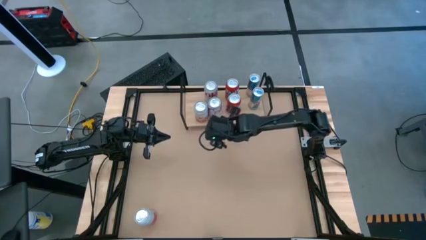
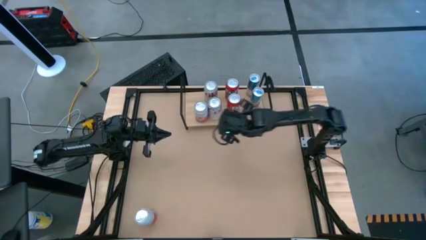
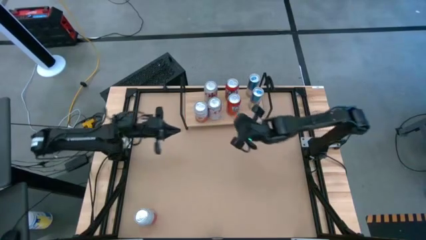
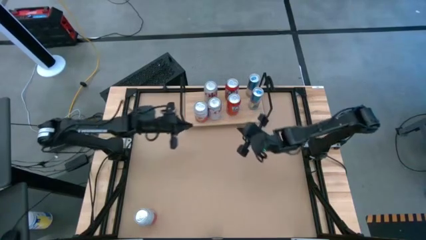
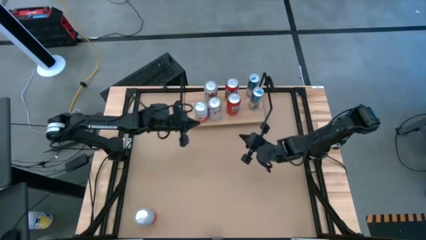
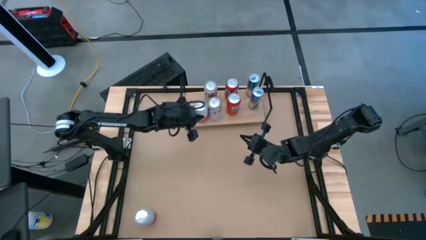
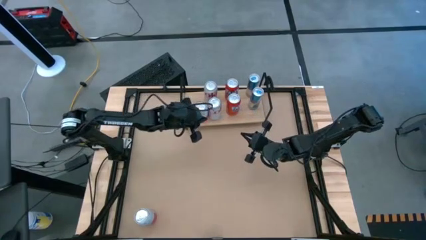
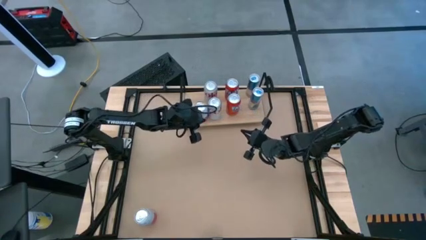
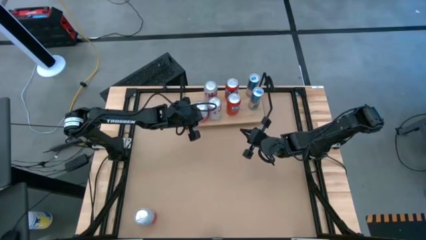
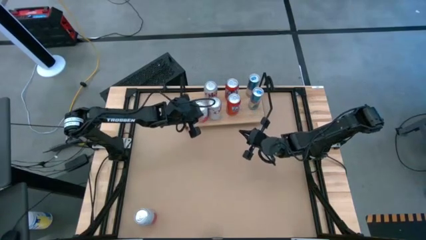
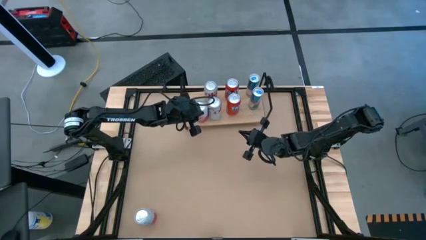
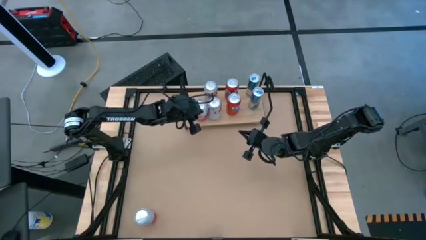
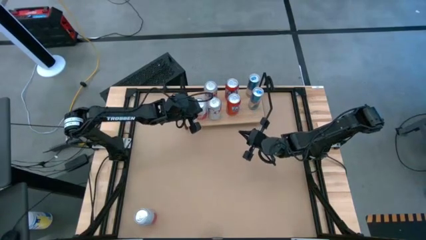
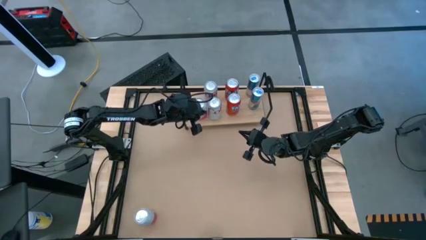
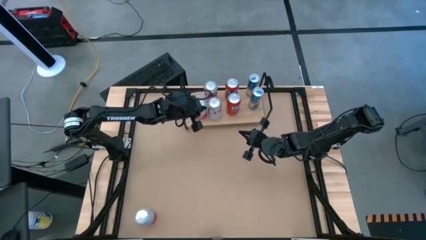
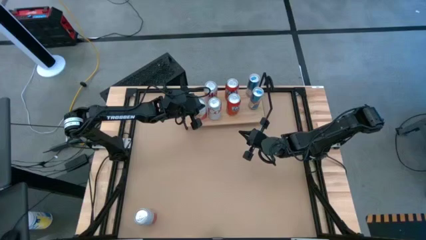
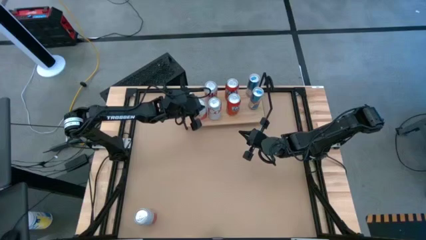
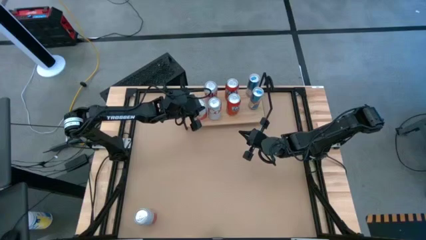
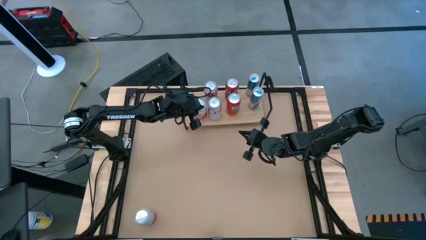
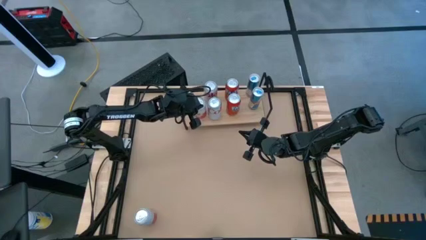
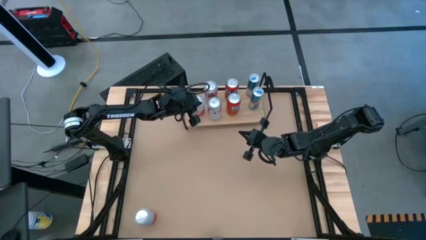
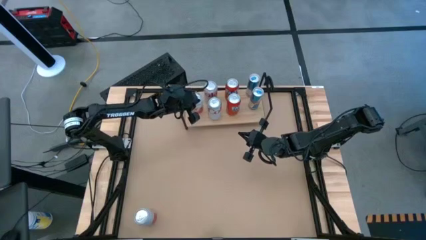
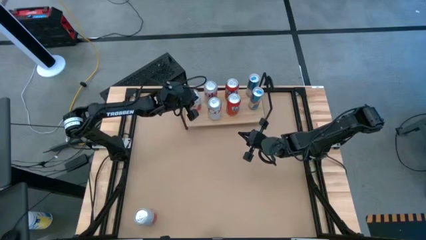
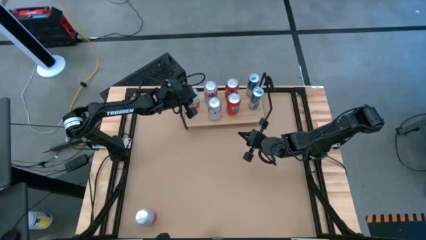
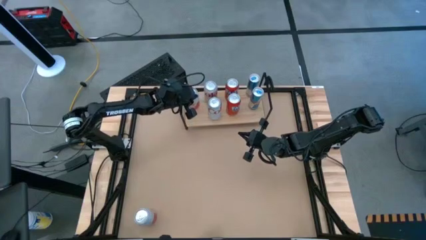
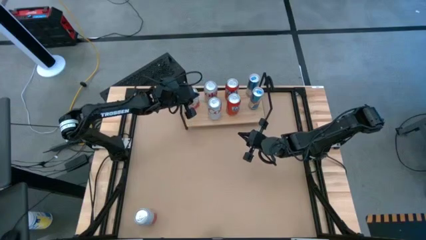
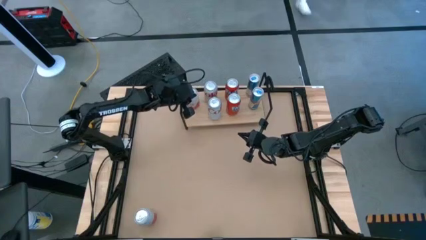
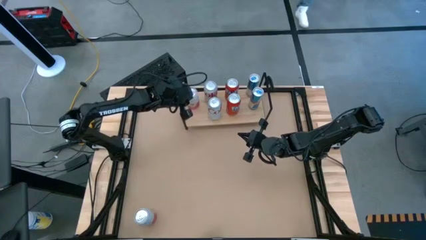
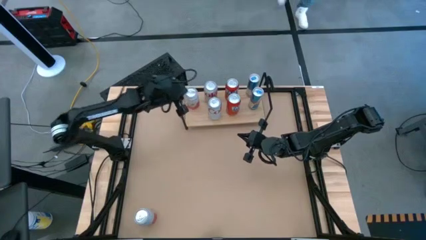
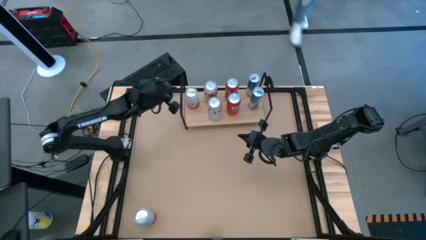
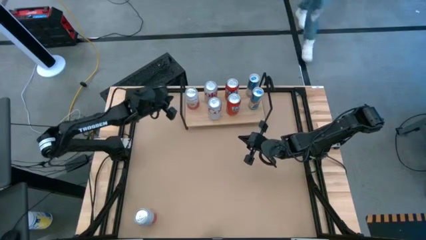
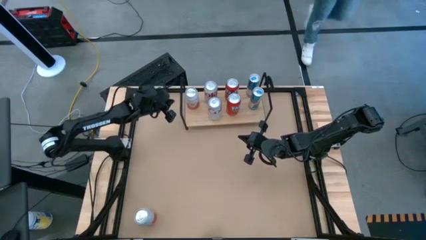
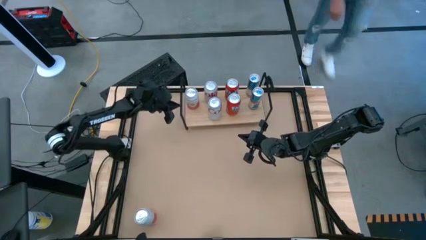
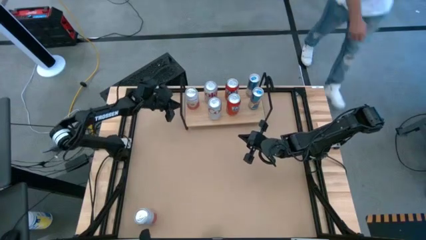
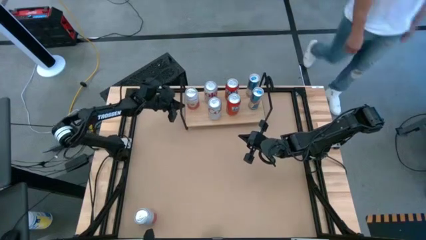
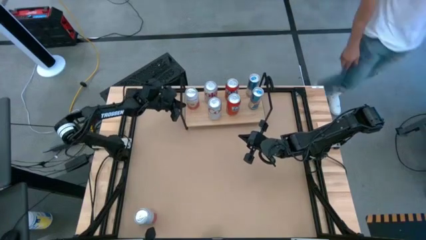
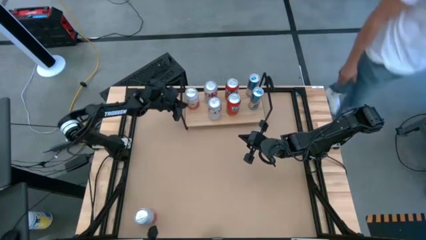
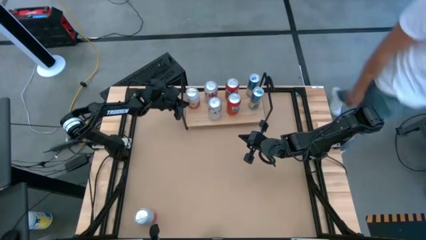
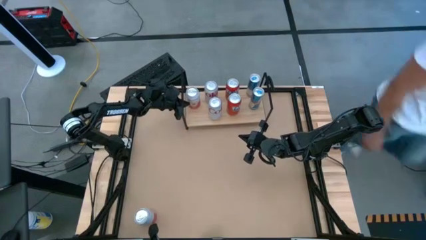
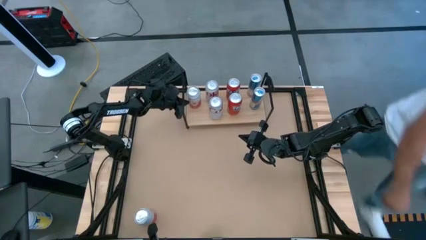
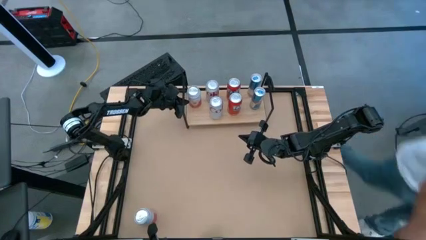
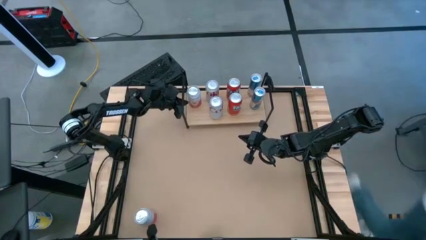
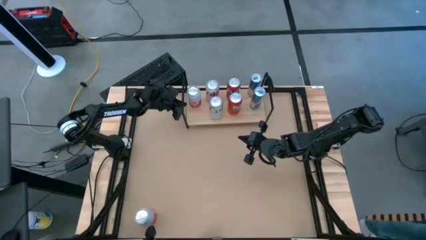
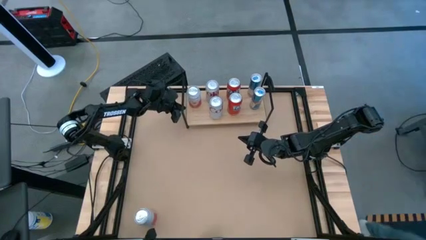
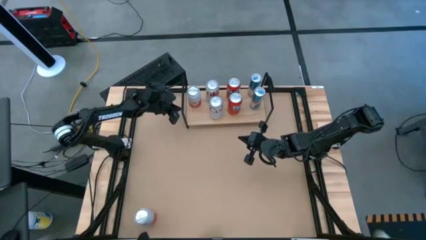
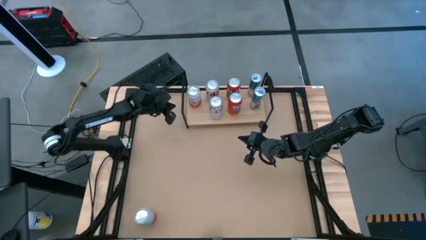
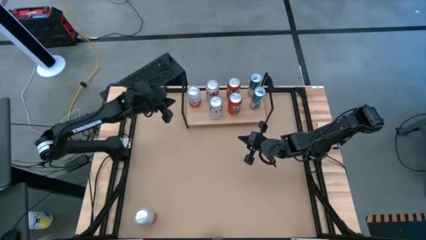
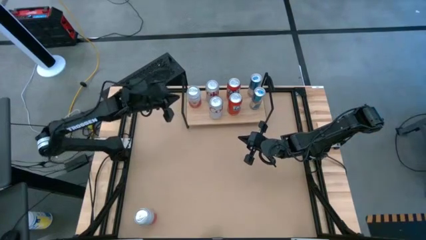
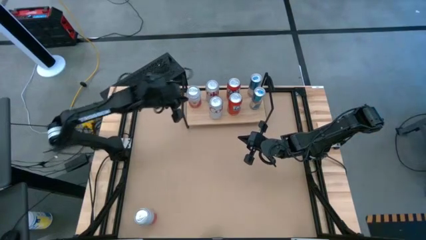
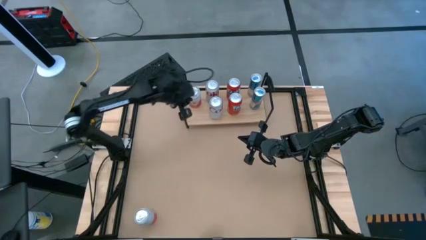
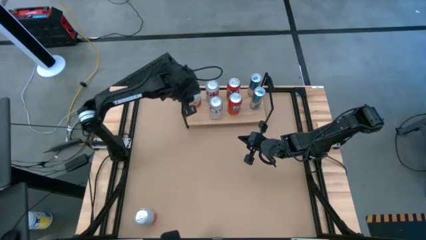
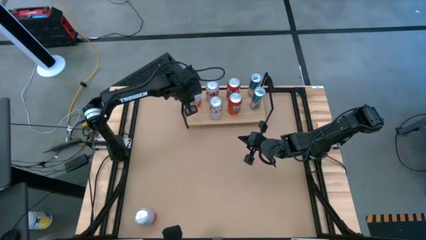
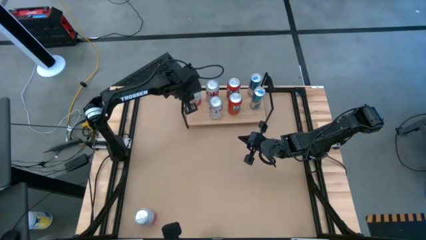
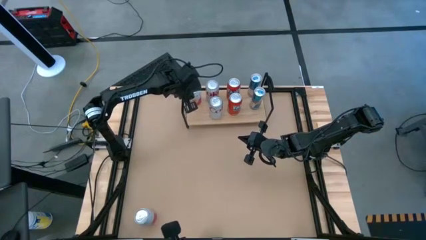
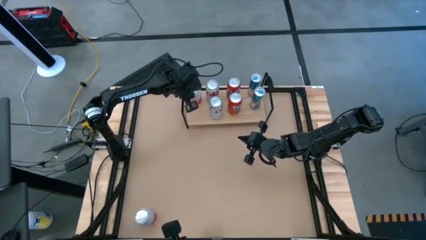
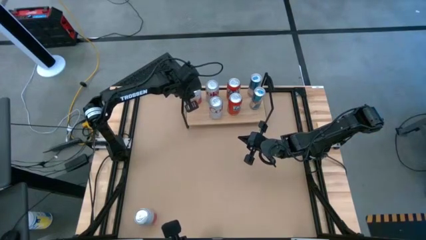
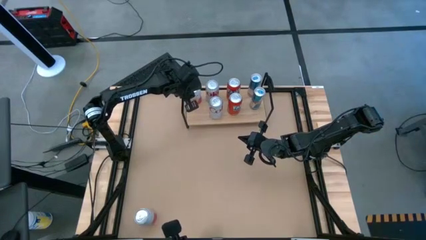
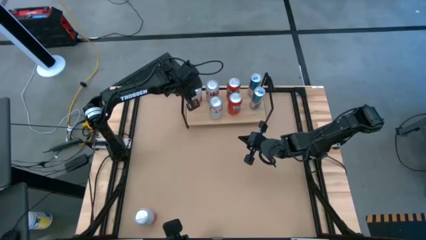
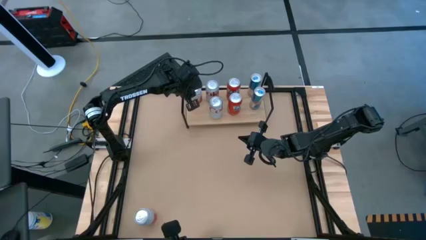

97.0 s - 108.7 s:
Task: Place canned beverage on shelf
Put the right pink and white soda can on the shelf

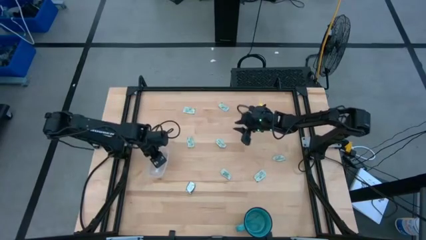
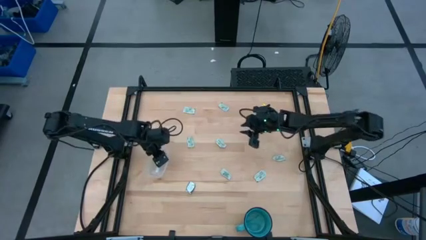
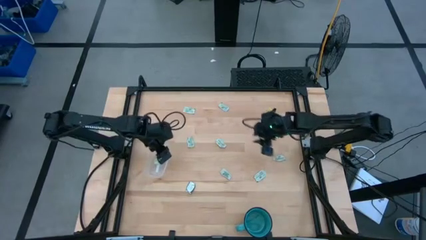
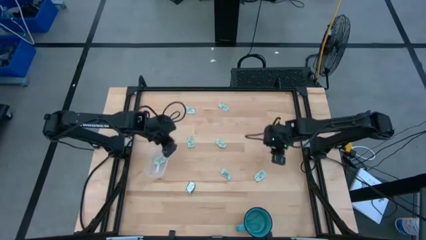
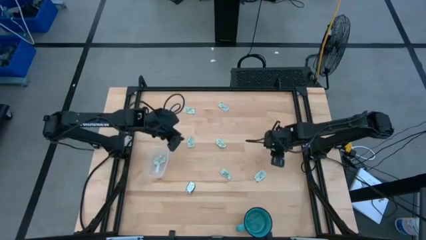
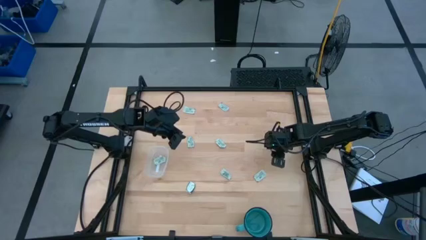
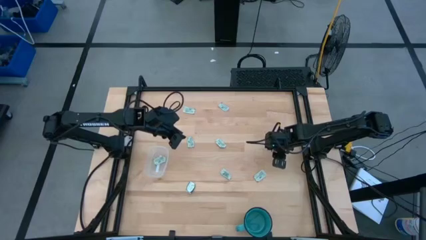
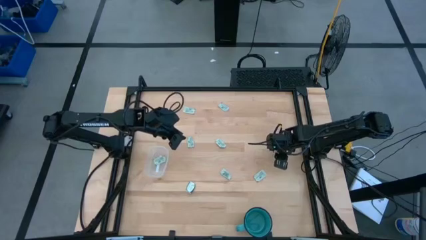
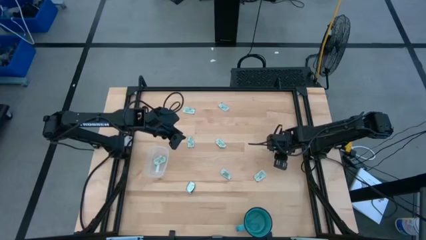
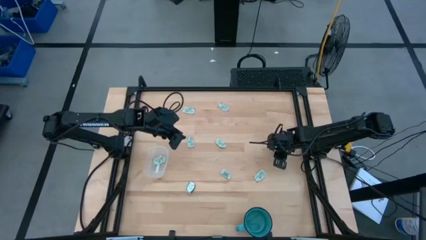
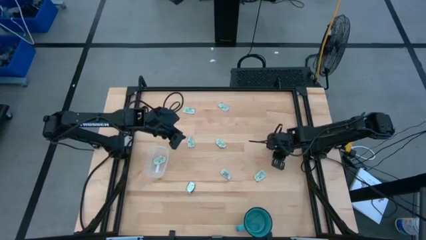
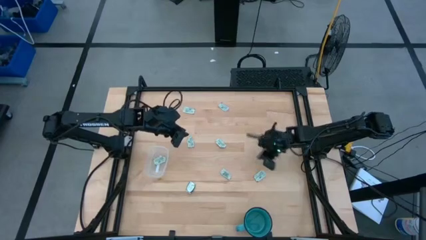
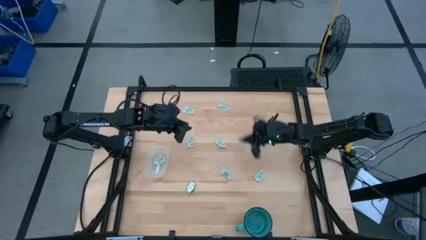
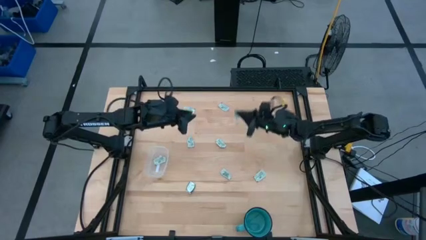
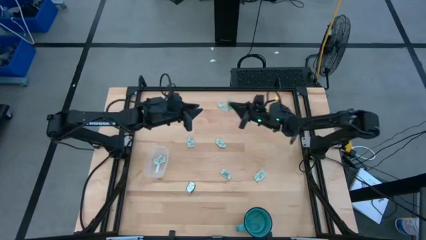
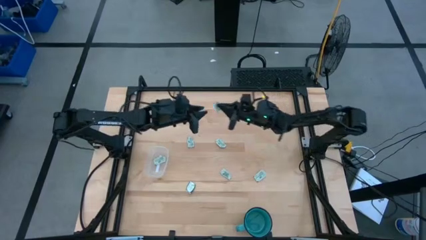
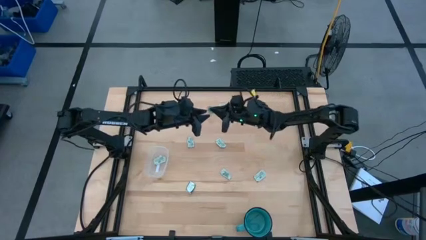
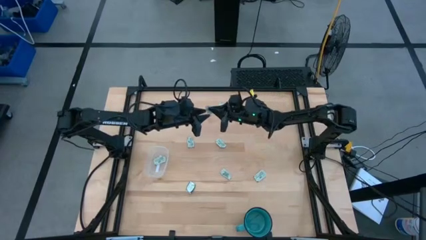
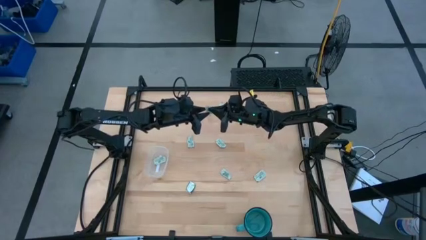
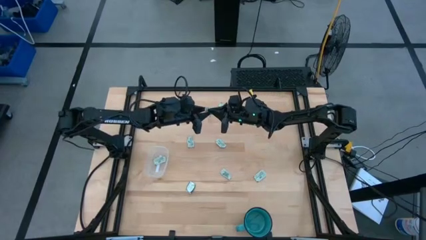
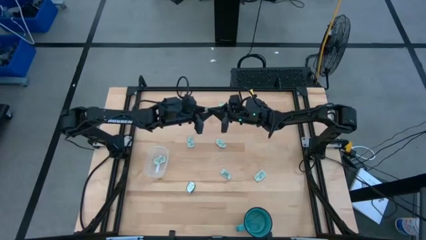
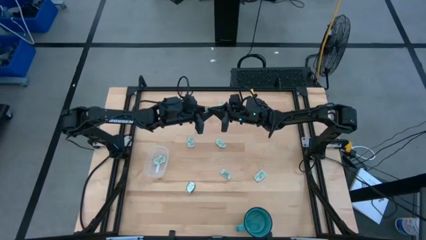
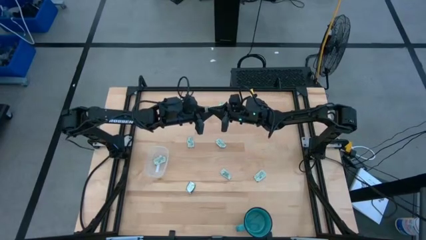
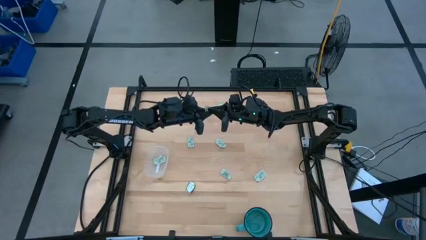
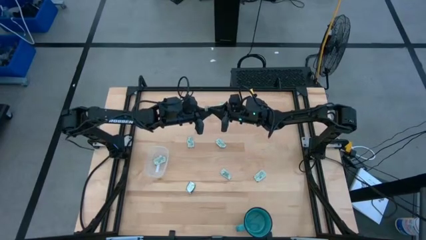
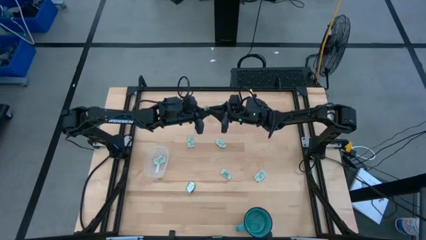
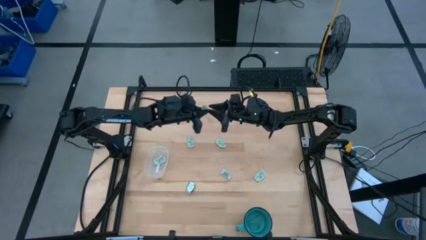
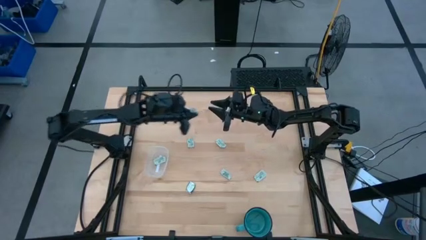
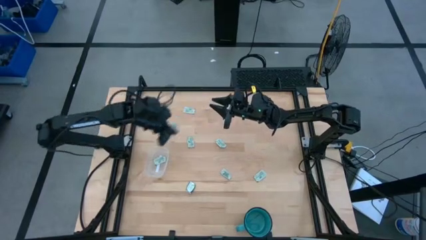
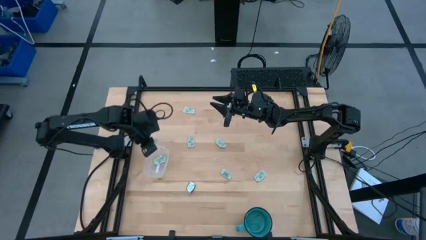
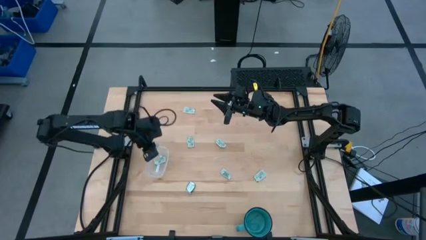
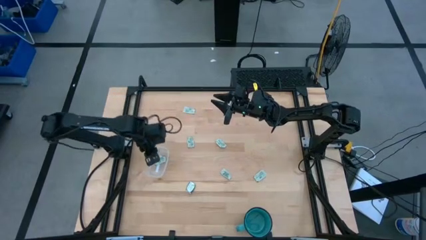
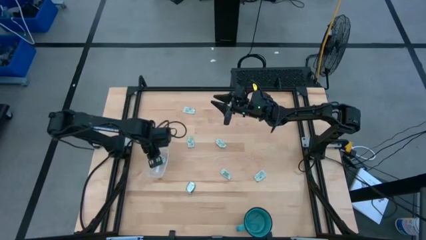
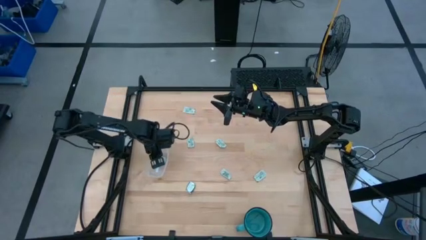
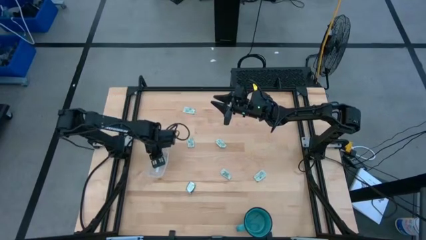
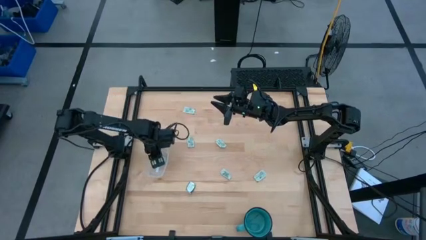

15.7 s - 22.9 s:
Task: Pick and place Stevia / Truvia into bins
Put the light green stevia packet into the transparent bin
